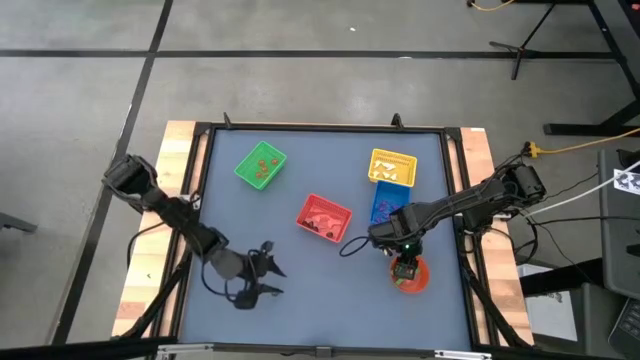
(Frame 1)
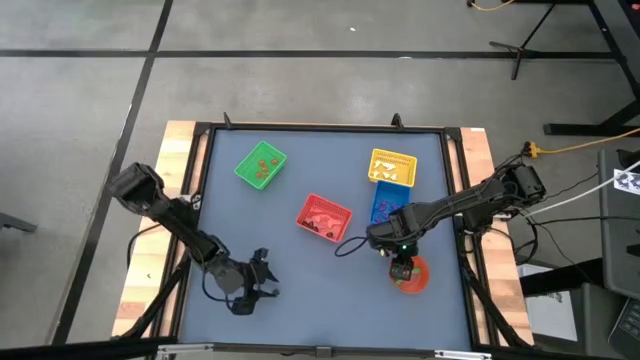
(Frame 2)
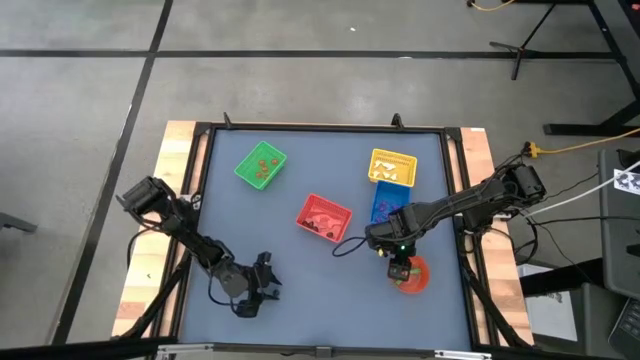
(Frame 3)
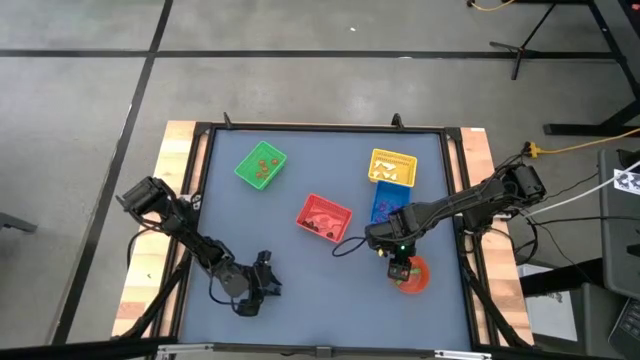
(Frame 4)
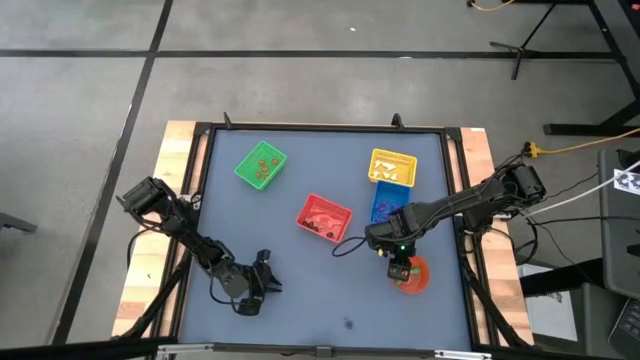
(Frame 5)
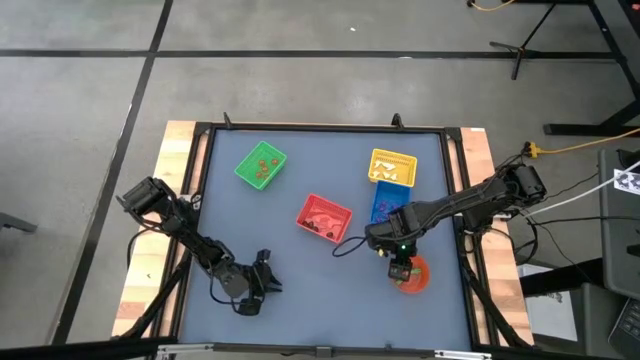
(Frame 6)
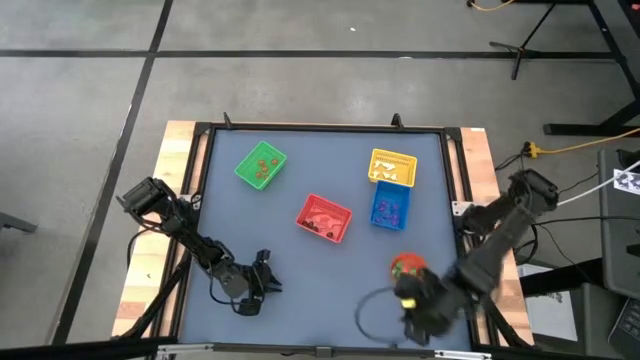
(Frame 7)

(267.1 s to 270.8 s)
Task: Sort Halloween decoration
Put the black skull toy into the red bin

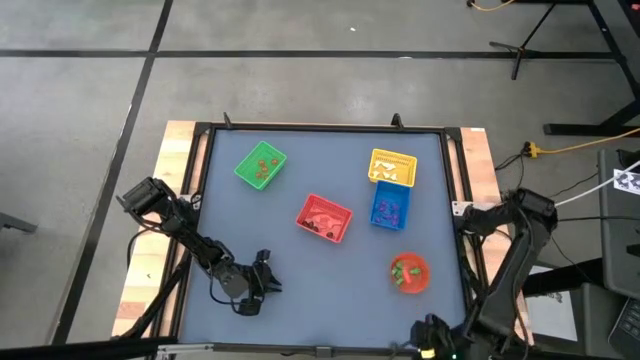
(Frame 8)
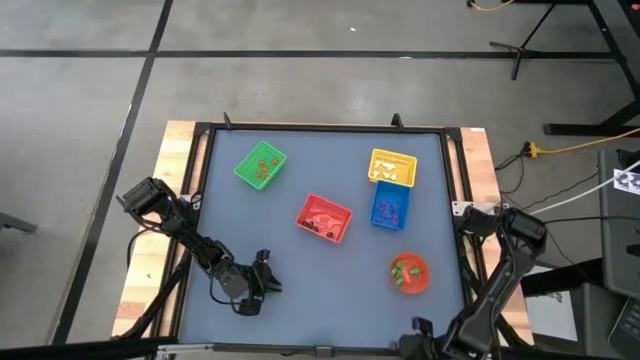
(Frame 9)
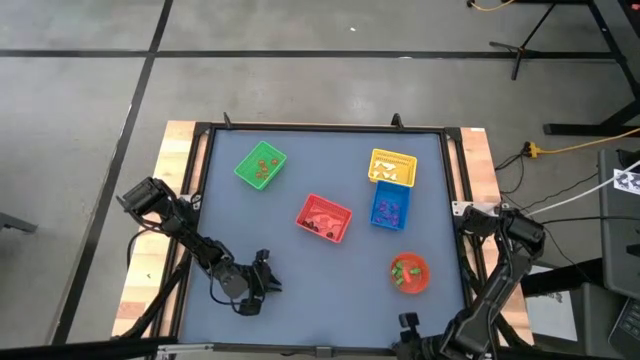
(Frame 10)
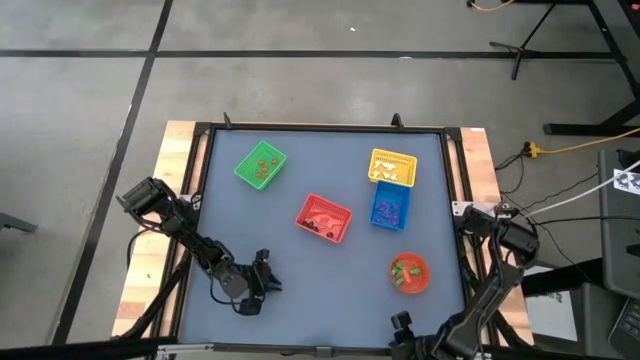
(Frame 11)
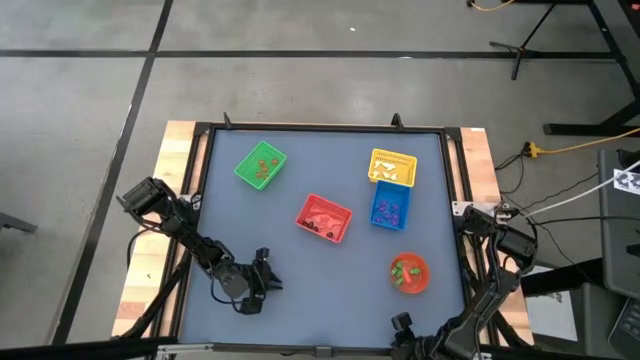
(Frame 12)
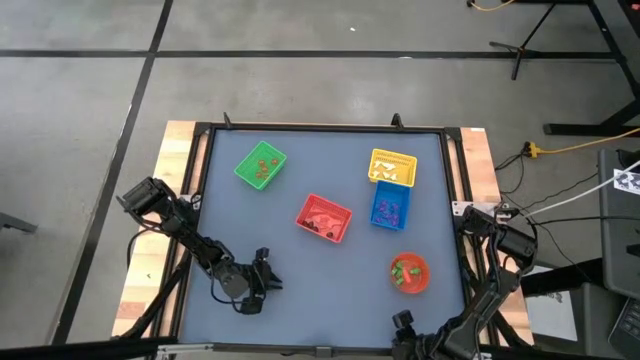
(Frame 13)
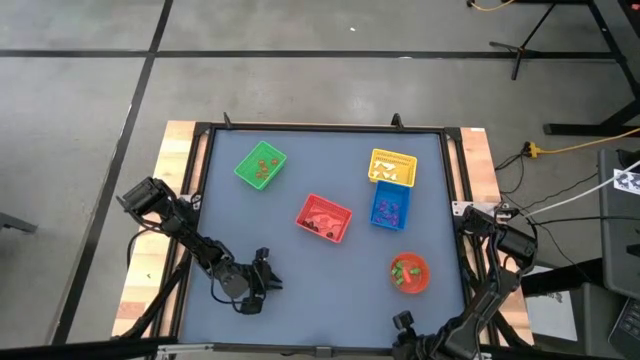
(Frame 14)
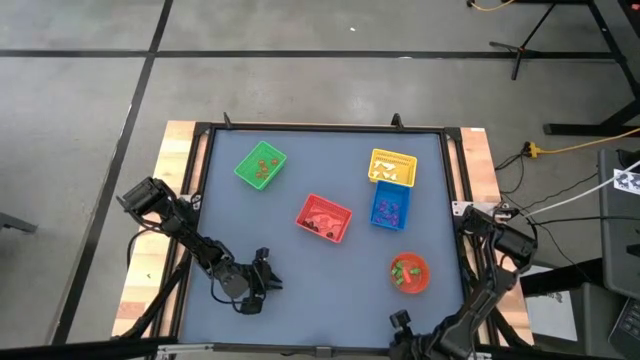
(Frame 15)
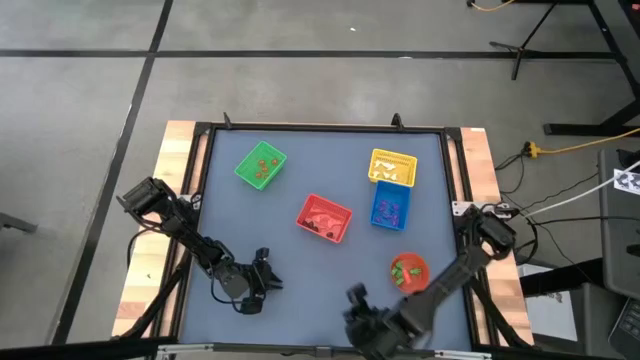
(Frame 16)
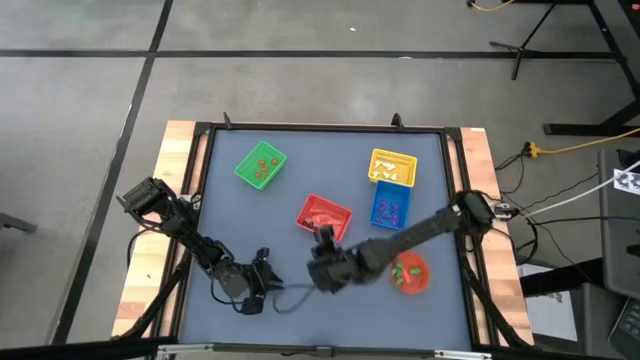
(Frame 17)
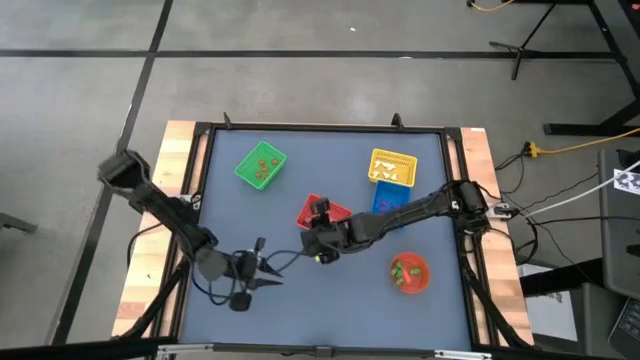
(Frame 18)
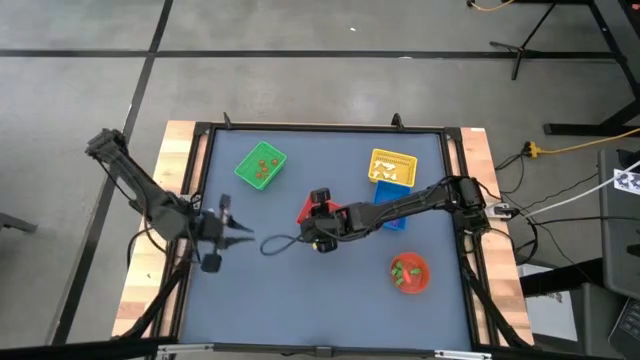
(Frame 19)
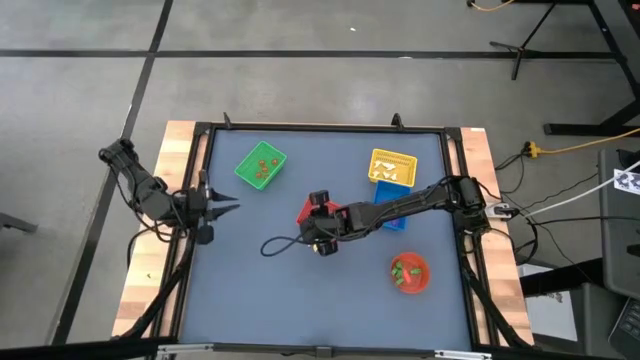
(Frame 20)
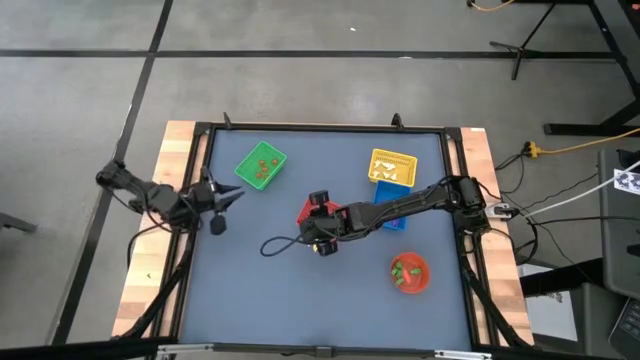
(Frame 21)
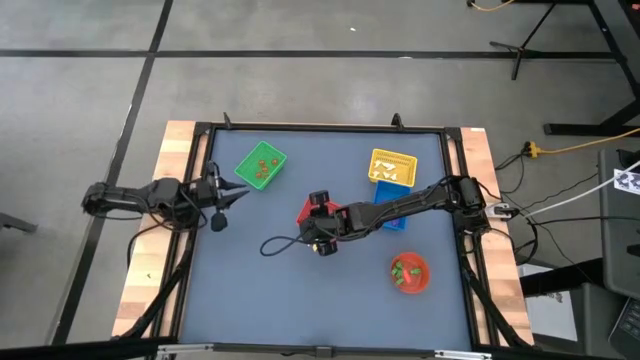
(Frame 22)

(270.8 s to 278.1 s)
Put the black skull toy into the red bin

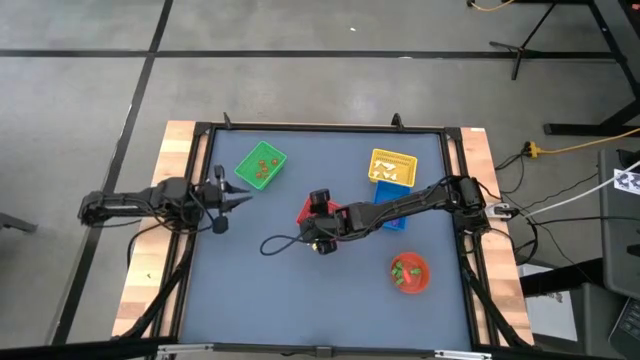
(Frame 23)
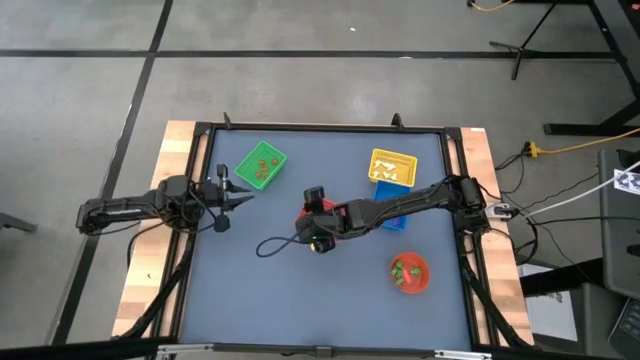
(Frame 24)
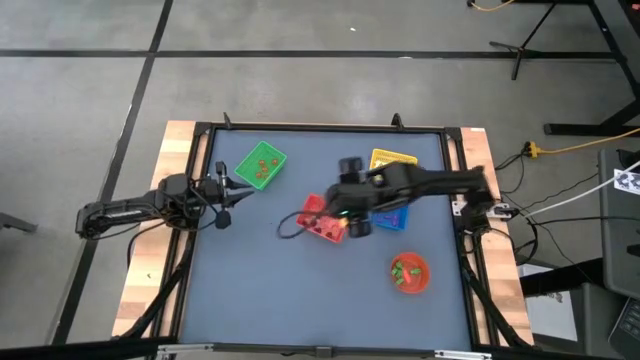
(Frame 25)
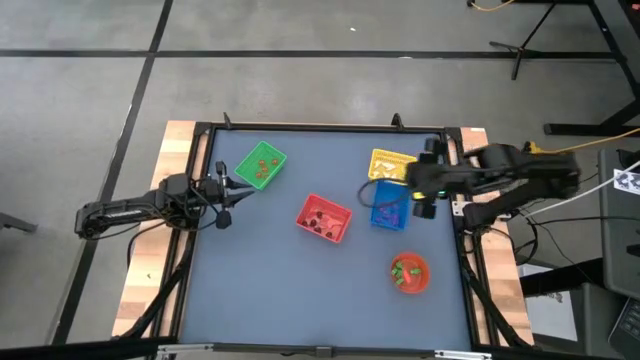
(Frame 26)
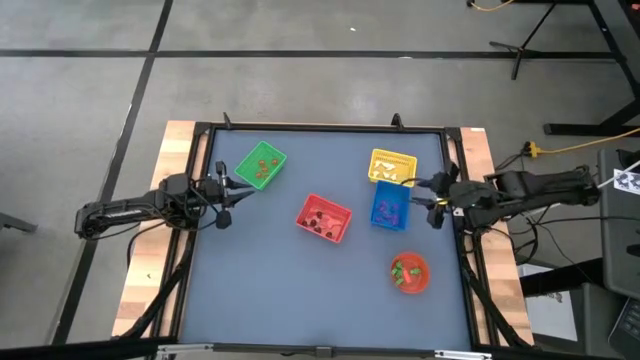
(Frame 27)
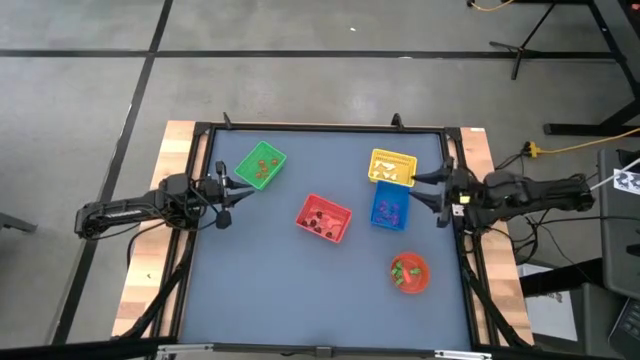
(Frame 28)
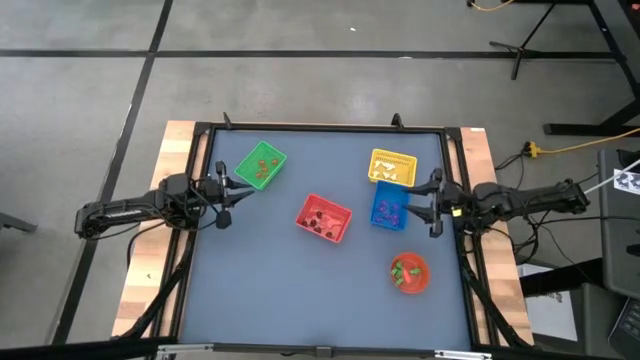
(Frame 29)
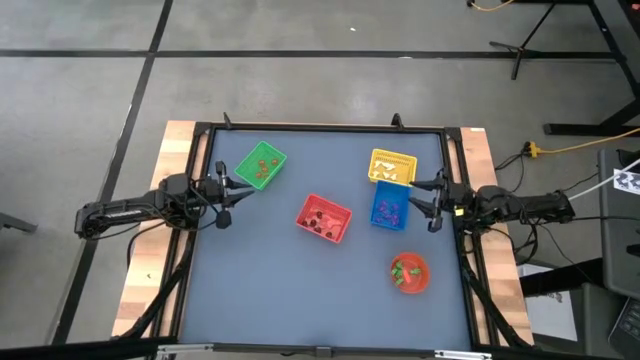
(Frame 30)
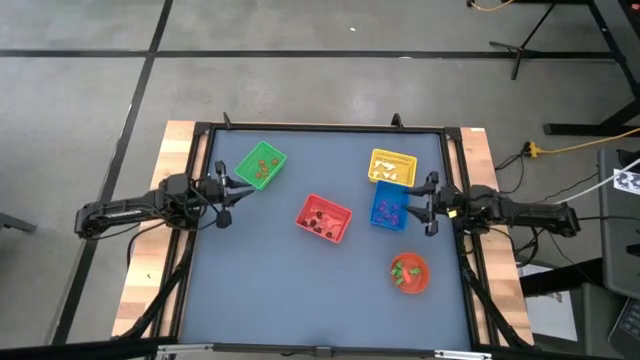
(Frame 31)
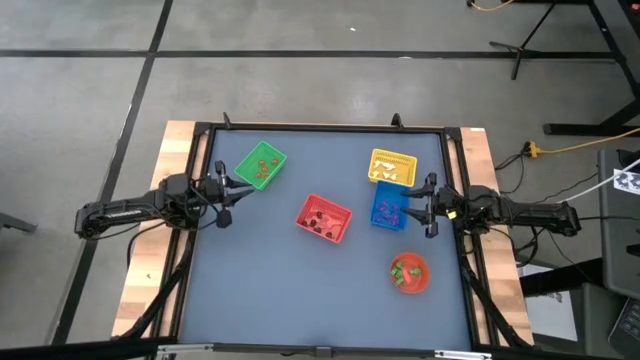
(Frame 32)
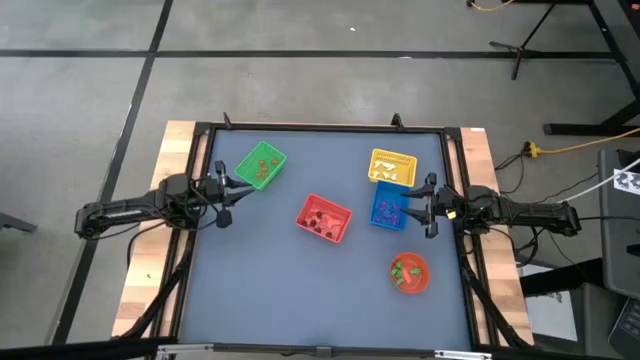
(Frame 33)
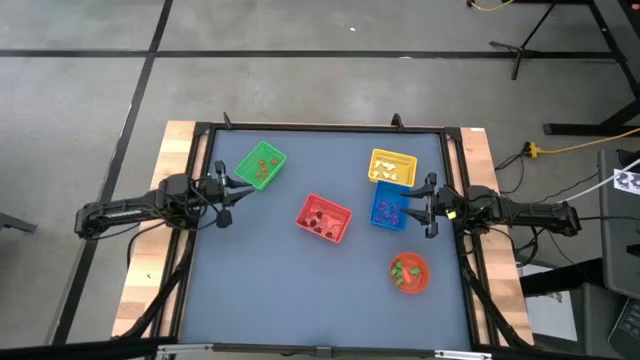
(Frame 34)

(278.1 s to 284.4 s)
Return to Home Position

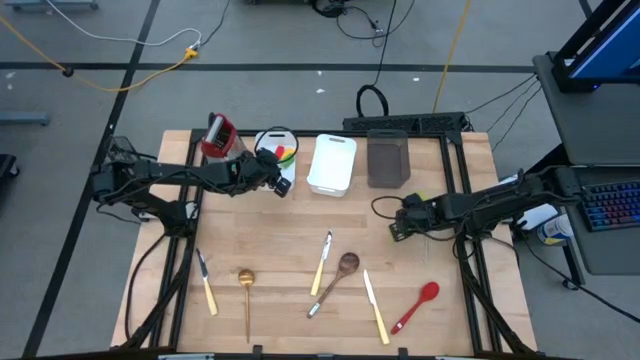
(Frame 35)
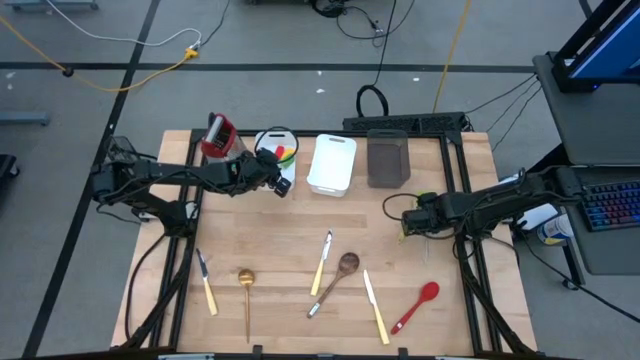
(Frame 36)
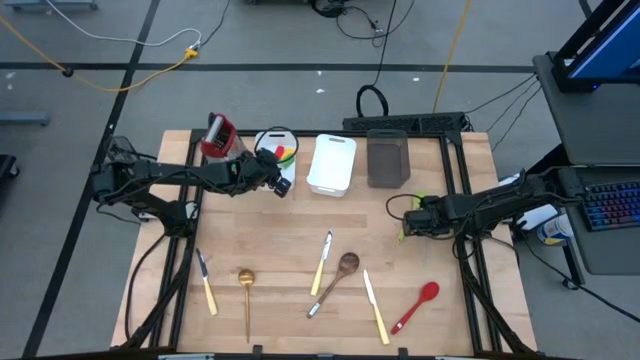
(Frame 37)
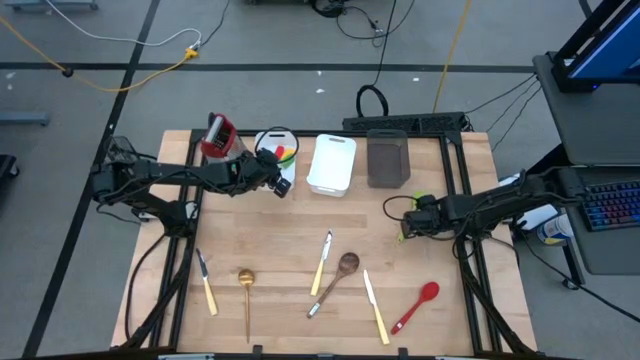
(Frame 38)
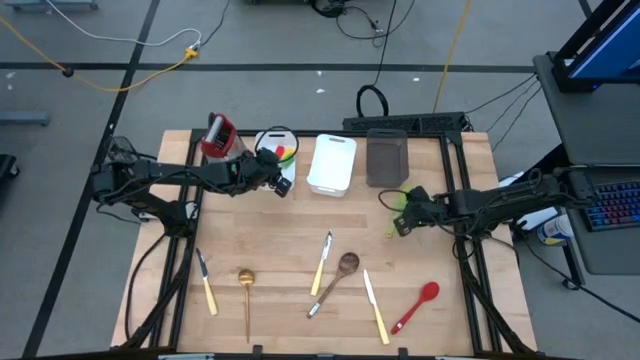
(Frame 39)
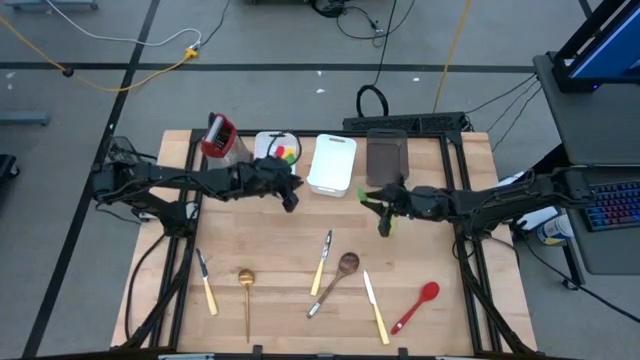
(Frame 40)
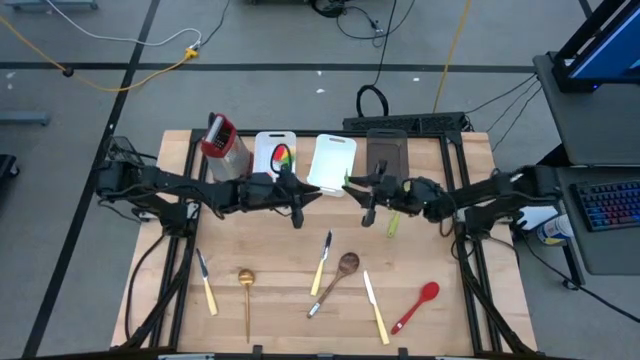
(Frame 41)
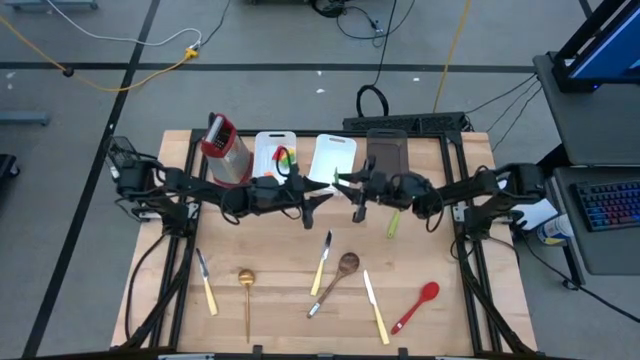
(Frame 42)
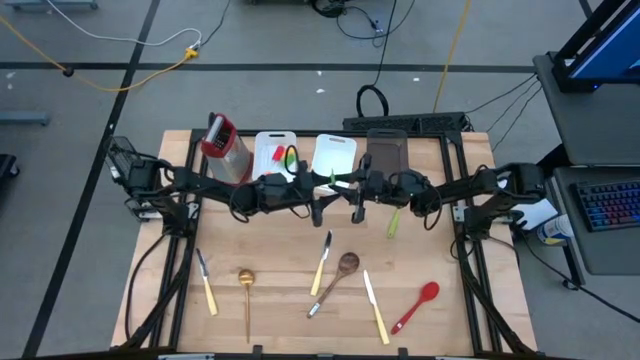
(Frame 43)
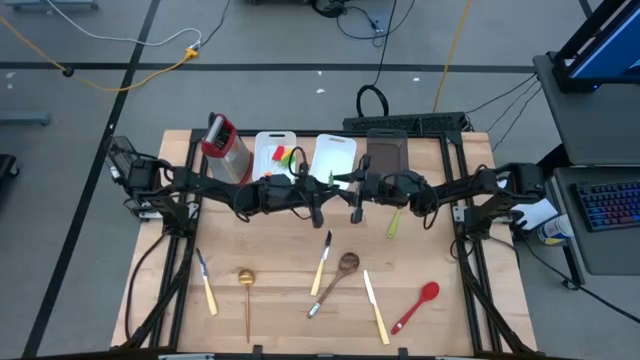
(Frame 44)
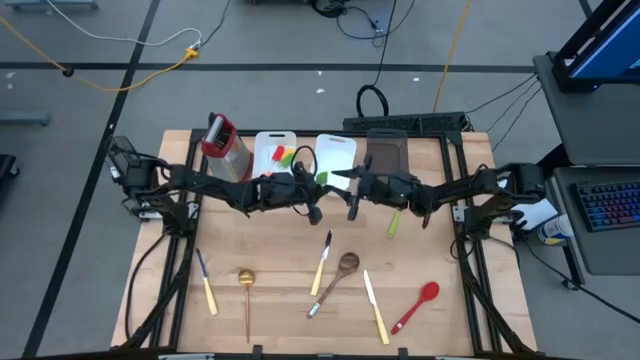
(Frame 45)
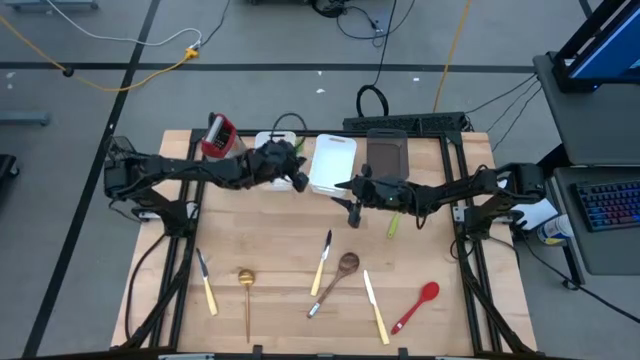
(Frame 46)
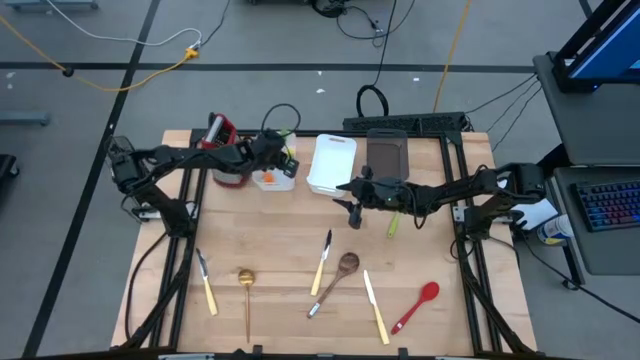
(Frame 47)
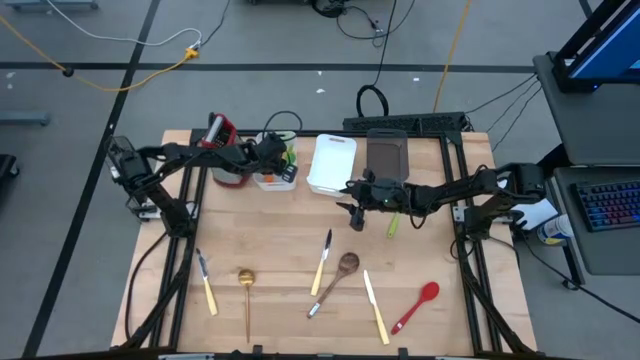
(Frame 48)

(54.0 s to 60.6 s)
Task: Pick & Place Kitchen Items
Put the green spatula into the left white bin
